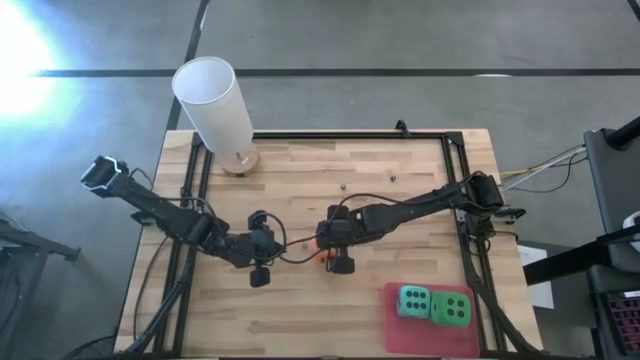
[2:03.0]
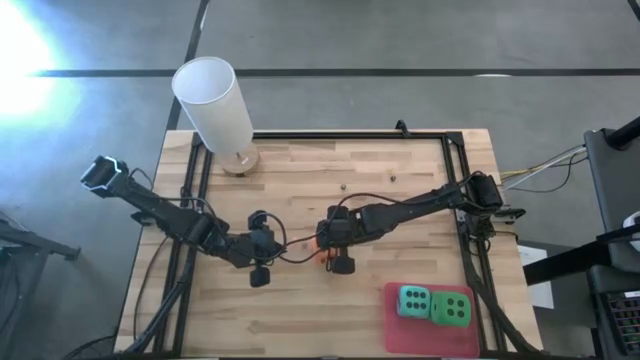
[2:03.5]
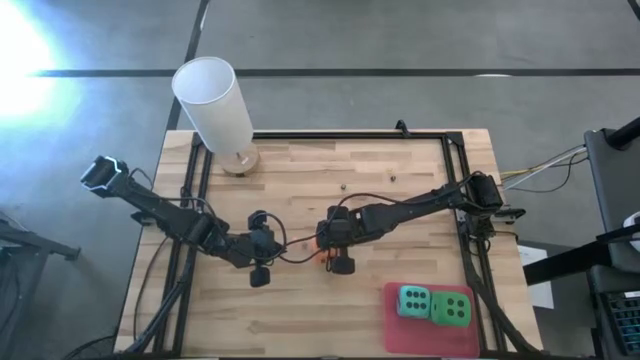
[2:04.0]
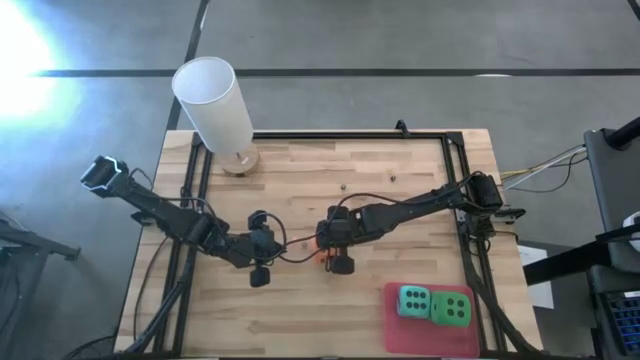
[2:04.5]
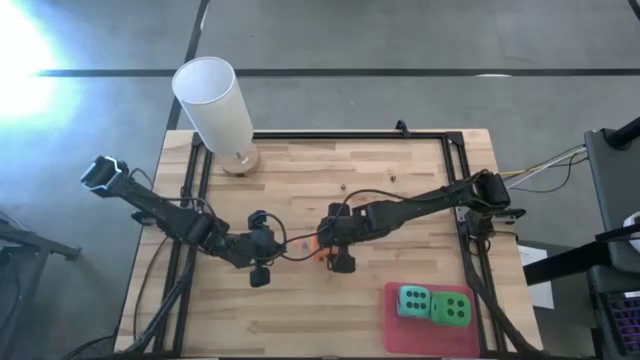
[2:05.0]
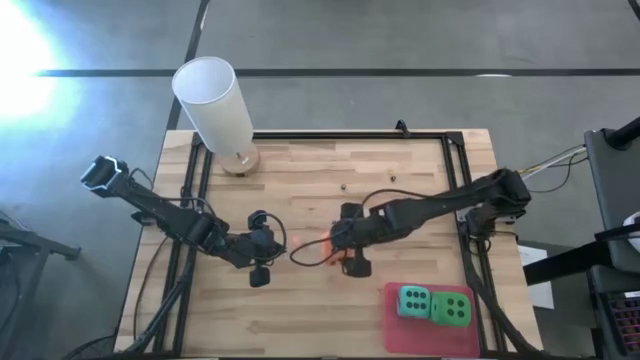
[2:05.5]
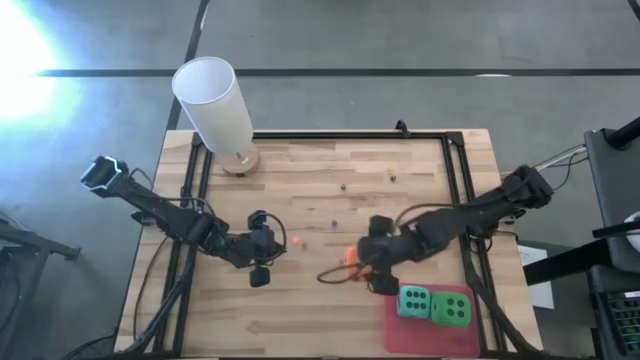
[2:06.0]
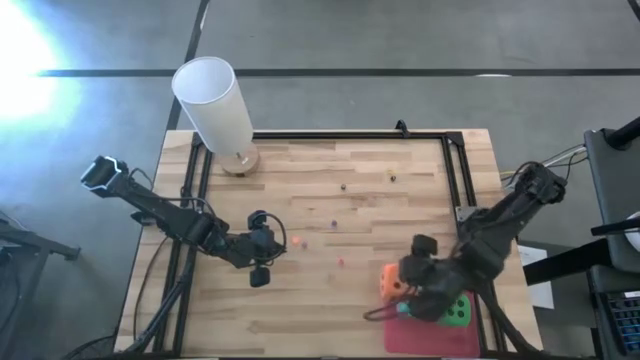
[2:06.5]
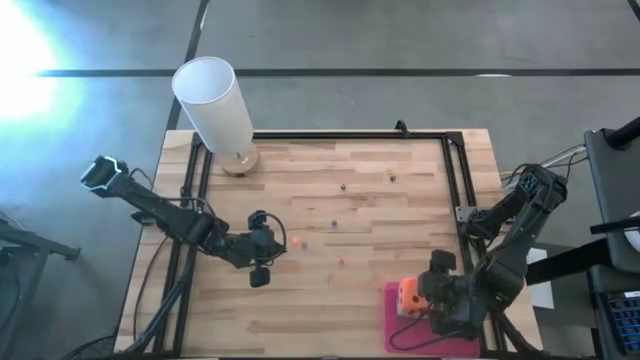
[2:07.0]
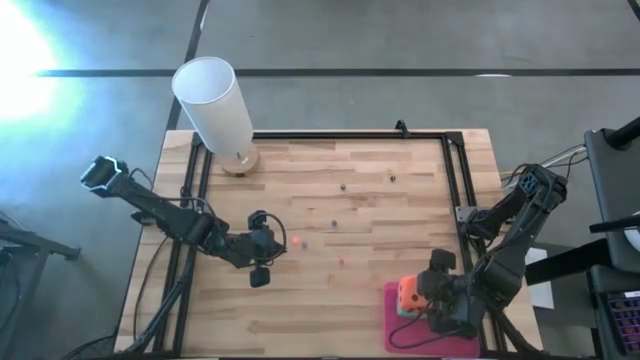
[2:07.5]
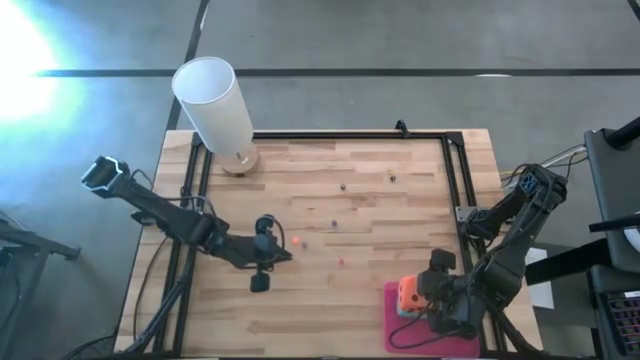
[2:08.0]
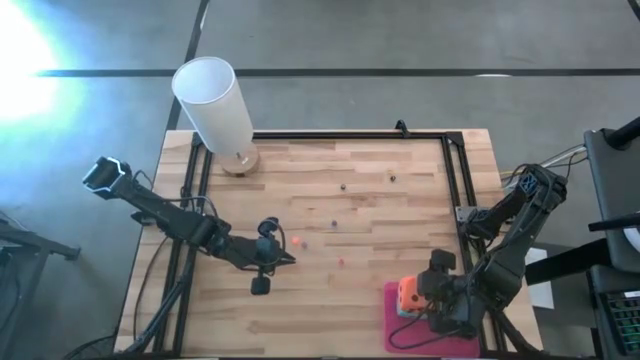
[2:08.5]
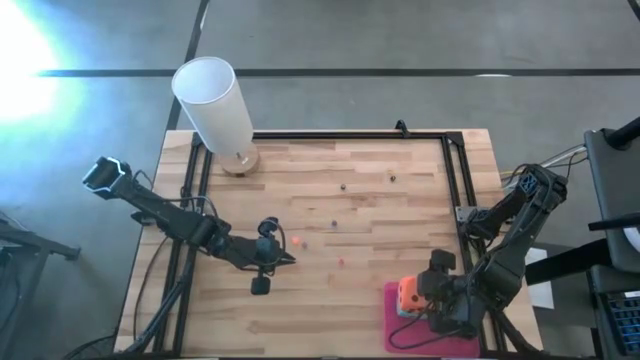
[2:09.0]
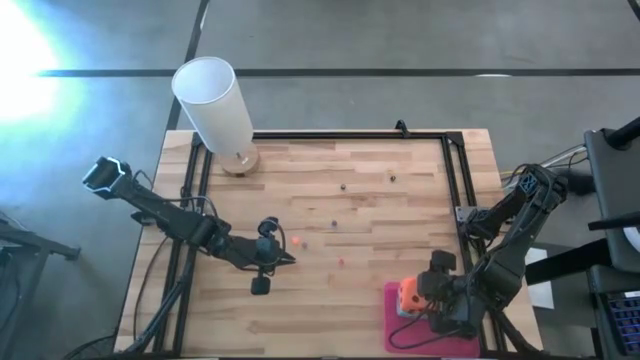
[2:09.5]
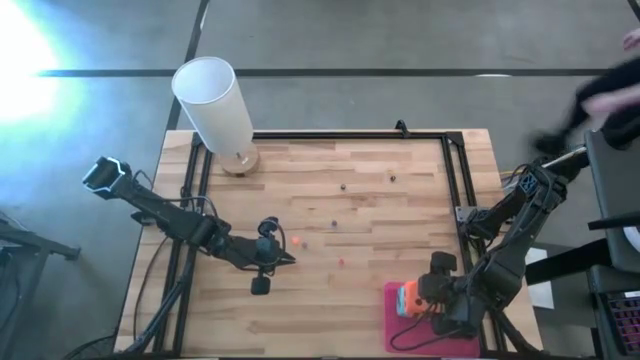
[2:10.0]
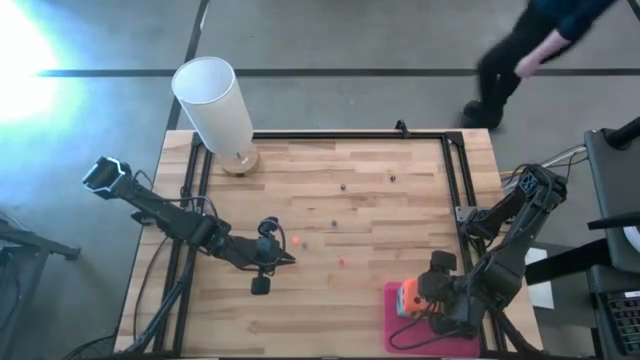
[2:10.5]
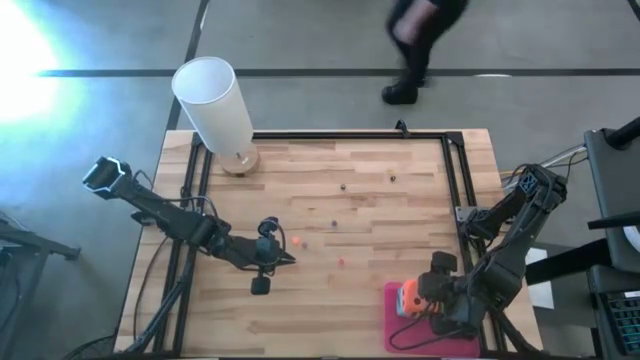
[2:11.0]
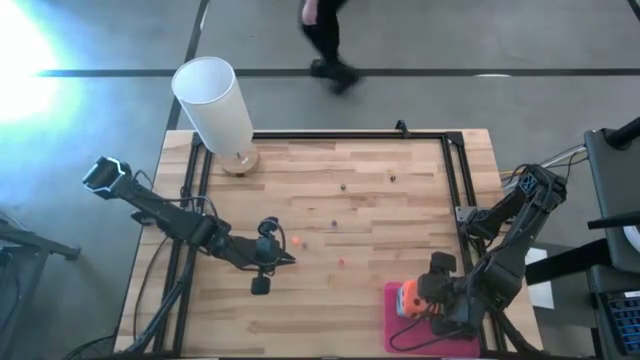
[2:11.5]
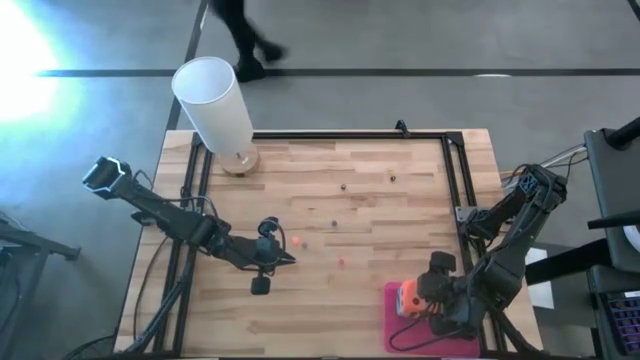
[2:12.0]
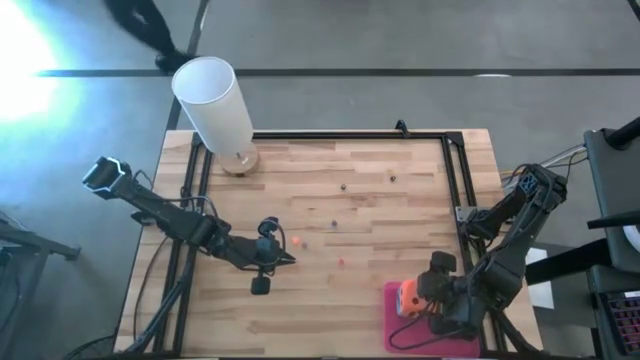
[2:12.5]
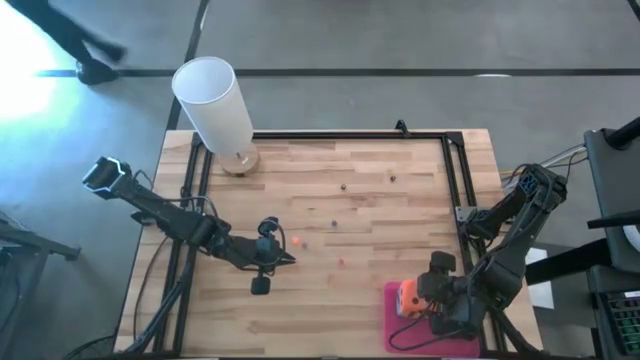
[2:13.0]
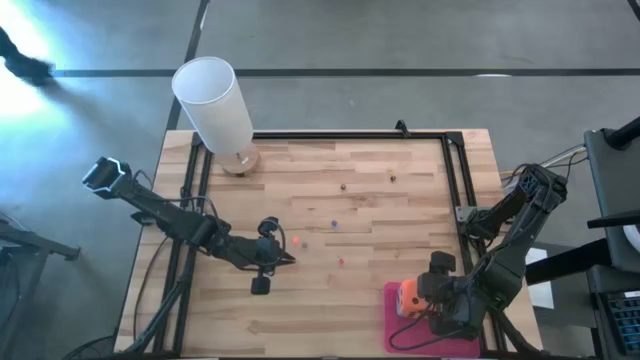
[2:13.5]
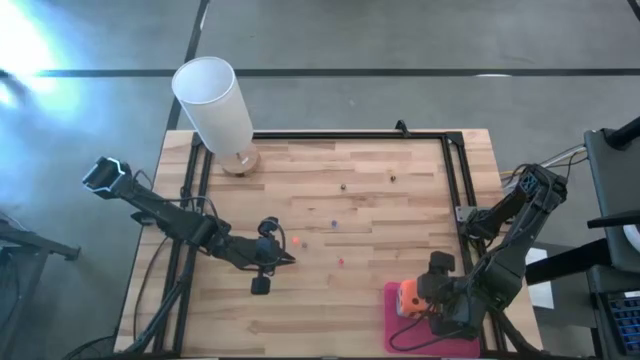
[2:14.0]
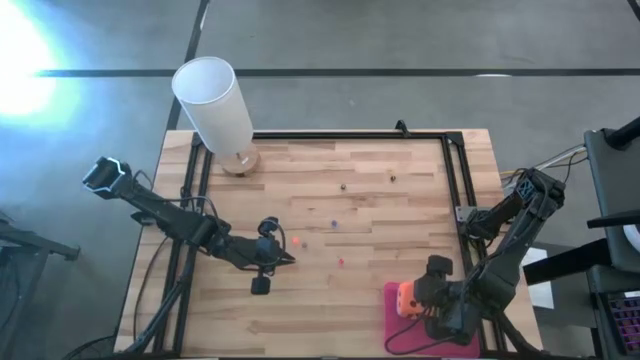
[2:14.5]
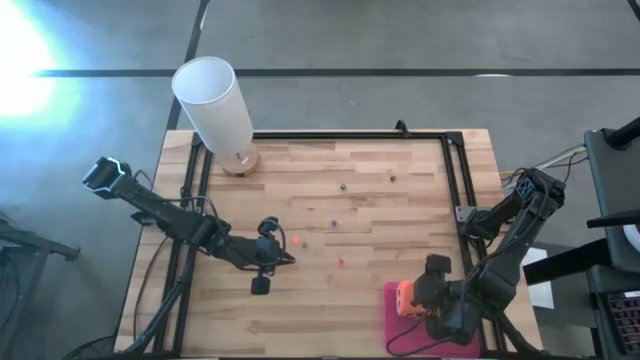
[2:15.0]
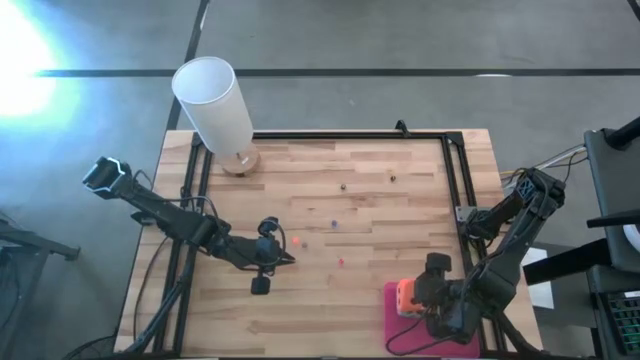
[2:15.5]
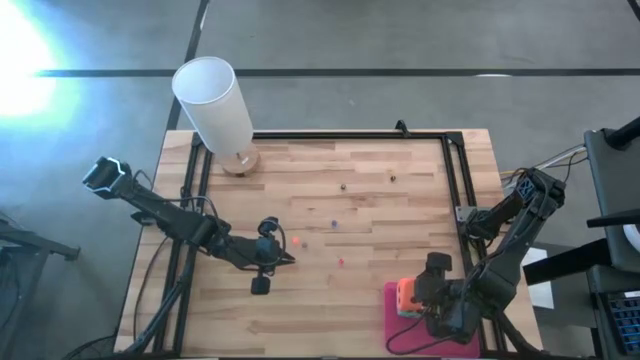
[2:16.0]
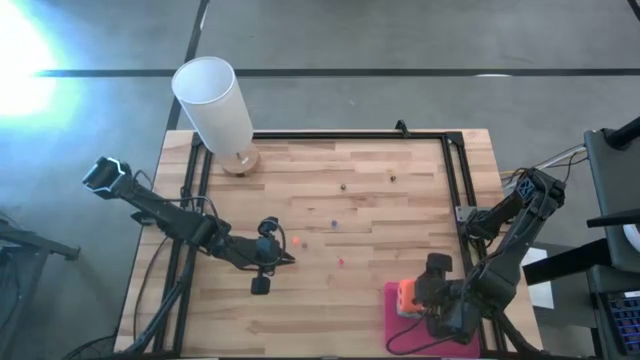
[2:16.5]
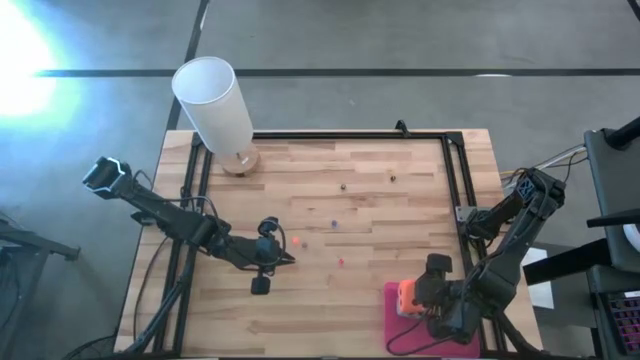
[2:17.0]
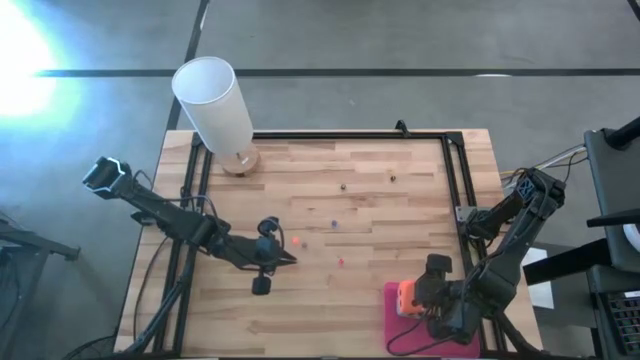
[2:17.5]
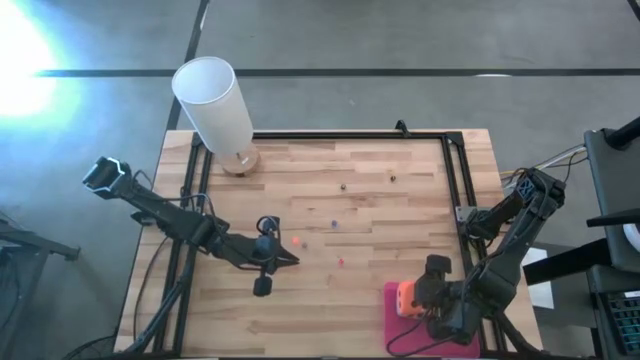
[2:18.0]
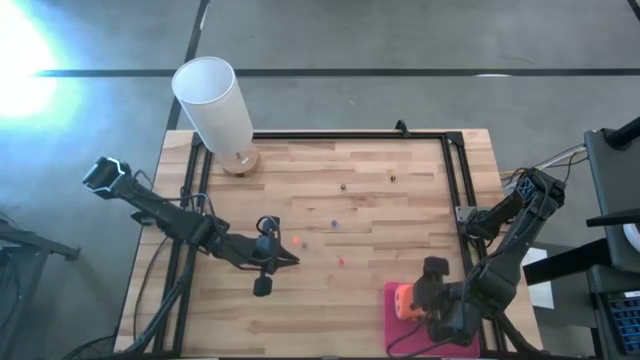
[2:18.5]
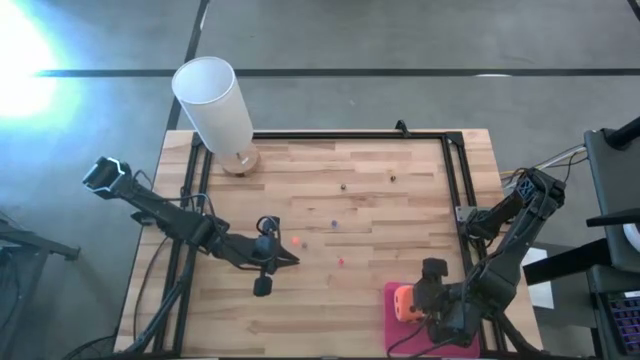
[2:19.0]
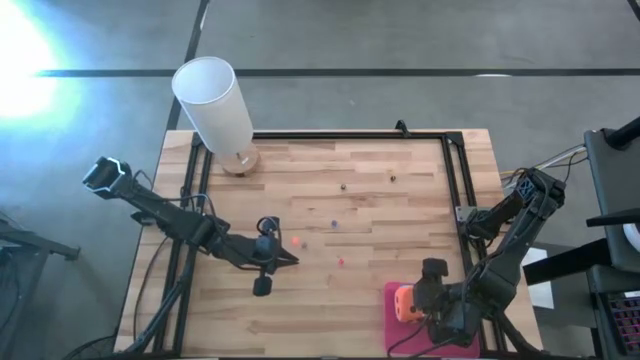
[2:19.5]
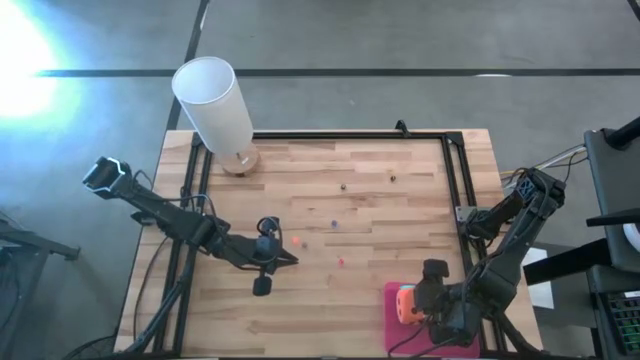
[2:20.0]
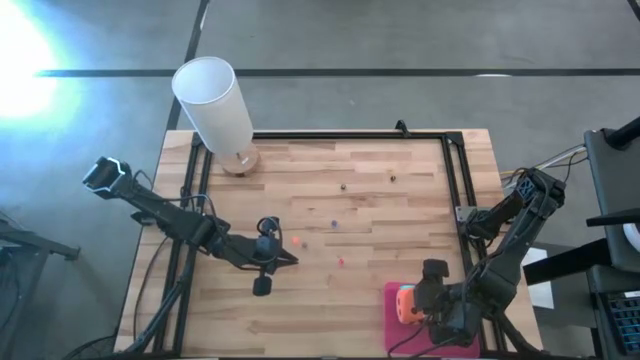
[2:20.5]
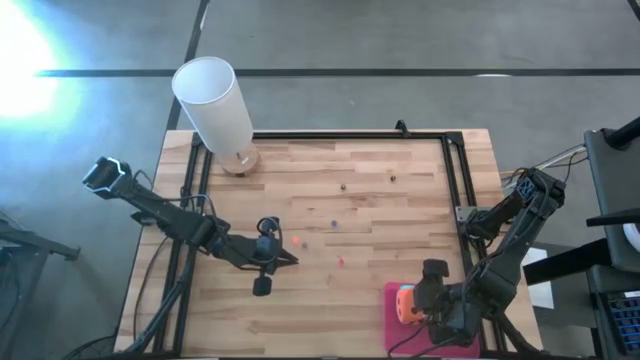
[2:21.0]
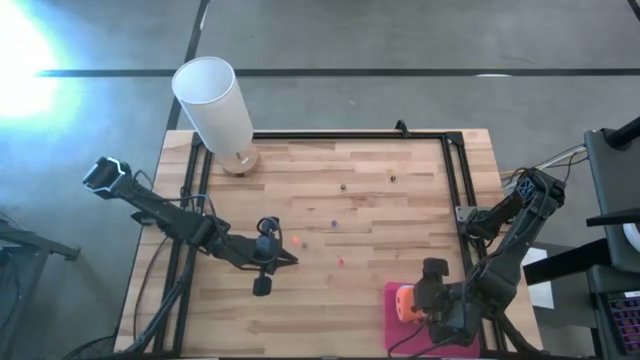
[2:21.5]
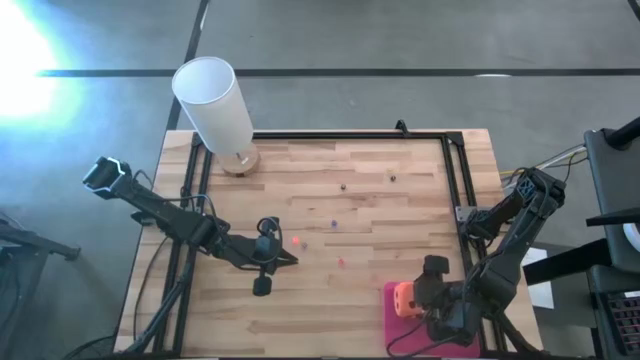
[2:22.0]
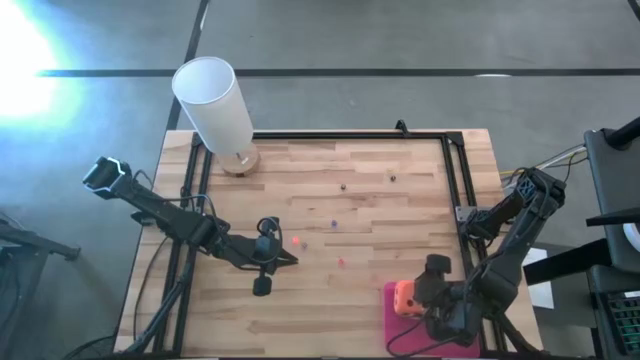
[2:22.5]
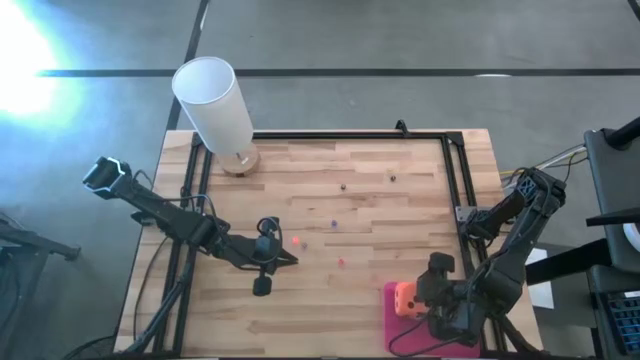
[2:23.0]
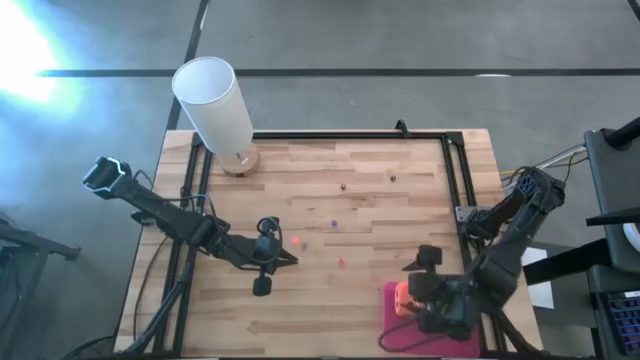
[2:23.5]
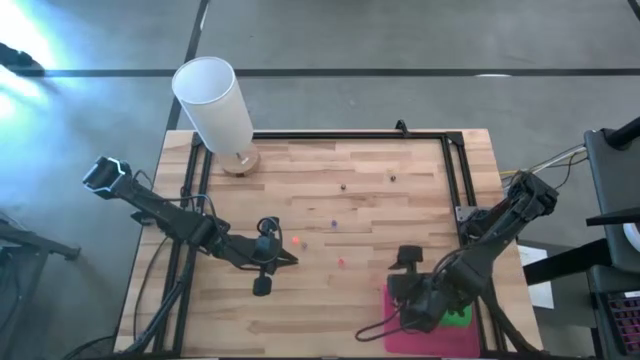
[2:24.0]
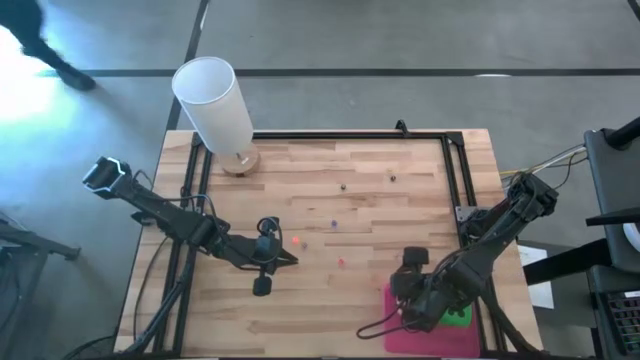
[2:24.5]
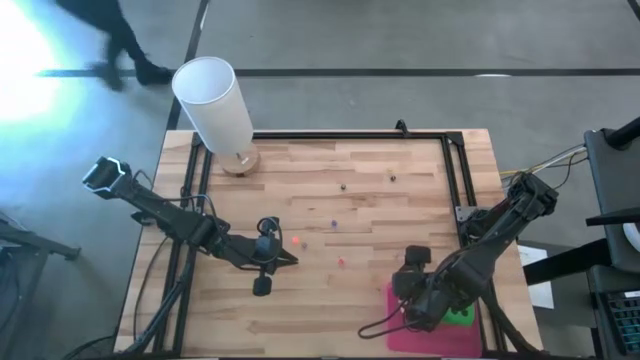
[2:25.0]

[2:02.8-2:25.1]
Task: Pick & Place Dice
Put the large orange die into the bin
